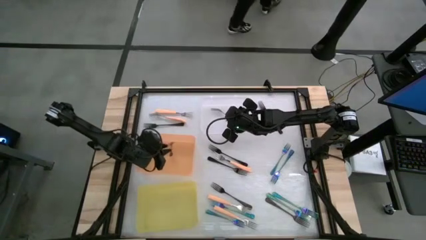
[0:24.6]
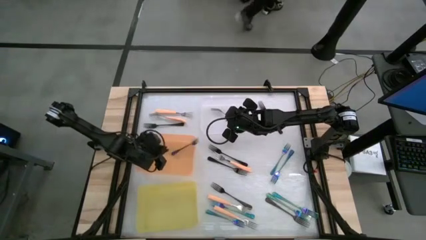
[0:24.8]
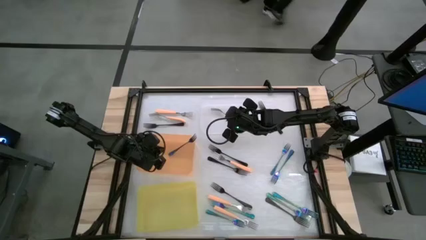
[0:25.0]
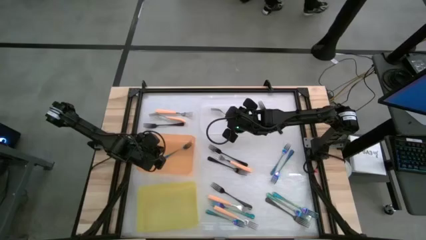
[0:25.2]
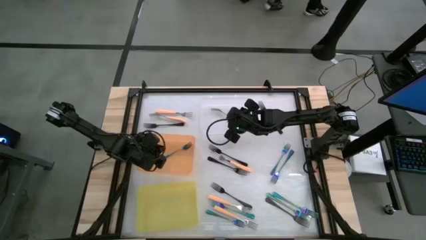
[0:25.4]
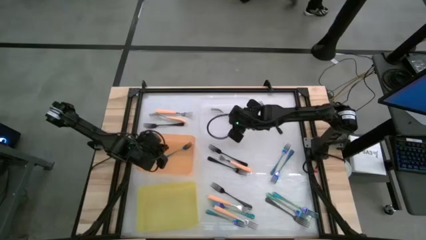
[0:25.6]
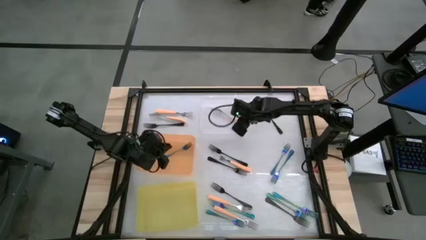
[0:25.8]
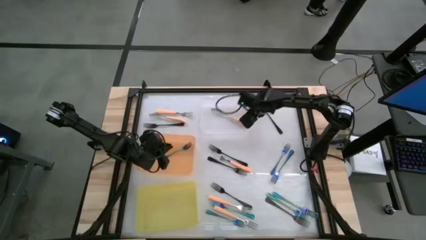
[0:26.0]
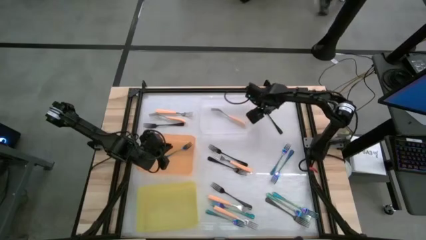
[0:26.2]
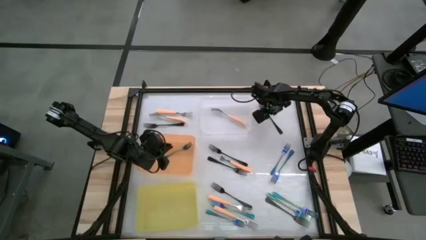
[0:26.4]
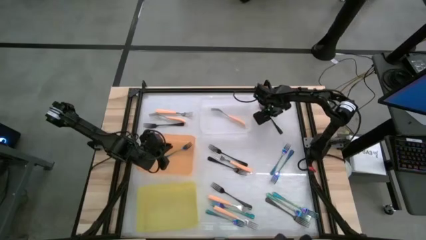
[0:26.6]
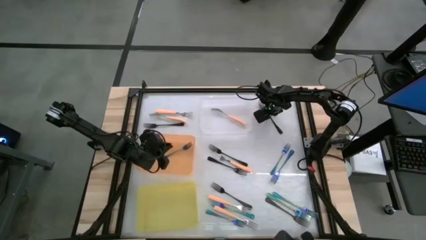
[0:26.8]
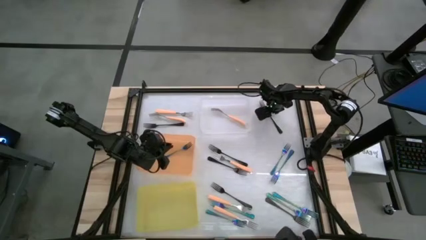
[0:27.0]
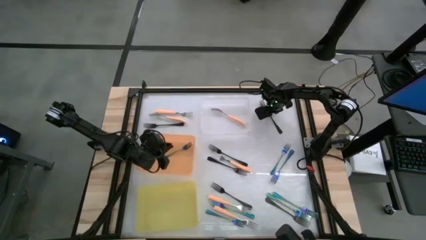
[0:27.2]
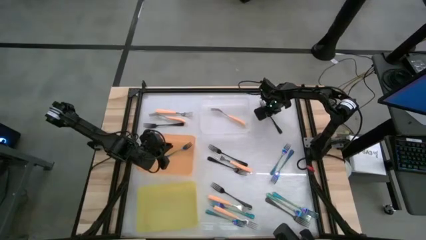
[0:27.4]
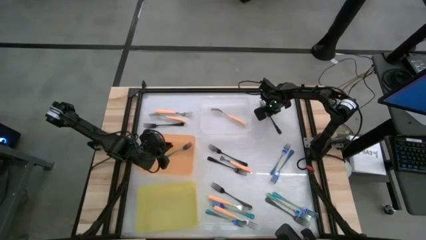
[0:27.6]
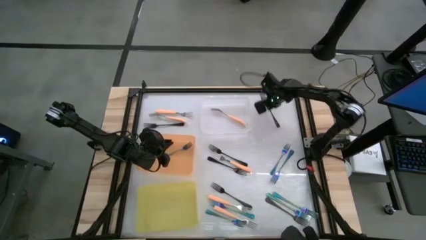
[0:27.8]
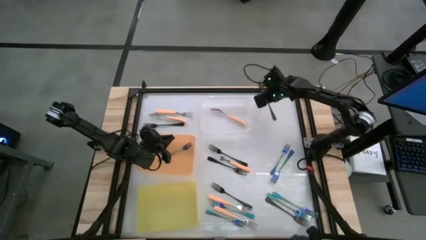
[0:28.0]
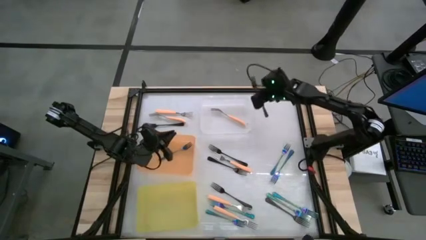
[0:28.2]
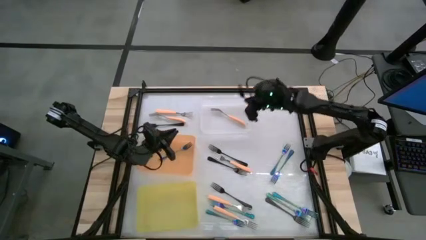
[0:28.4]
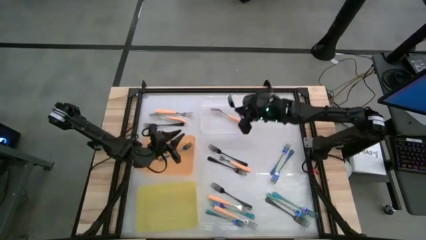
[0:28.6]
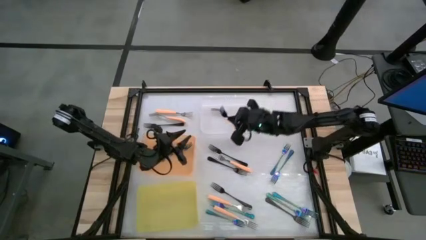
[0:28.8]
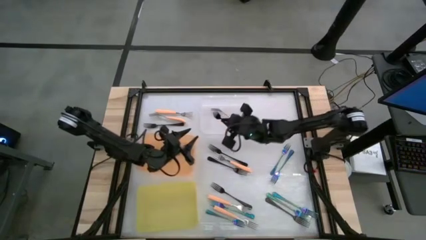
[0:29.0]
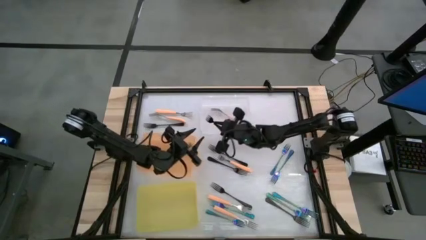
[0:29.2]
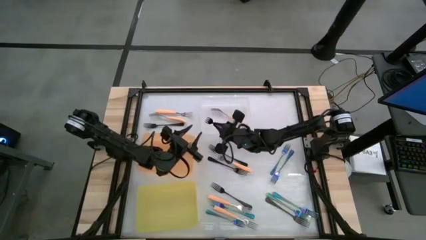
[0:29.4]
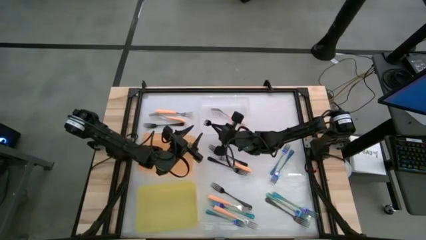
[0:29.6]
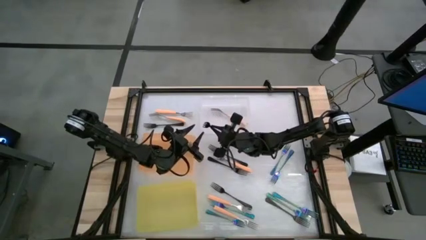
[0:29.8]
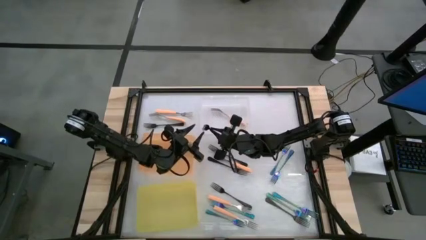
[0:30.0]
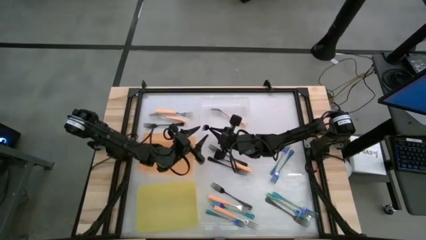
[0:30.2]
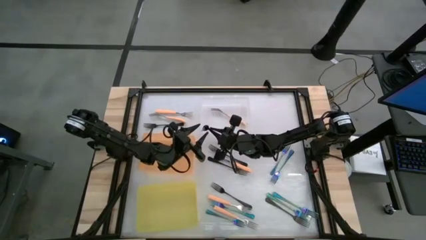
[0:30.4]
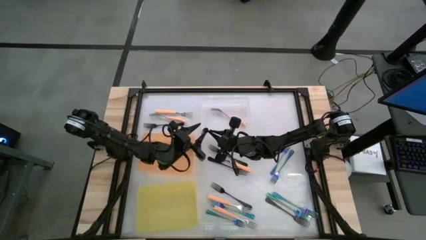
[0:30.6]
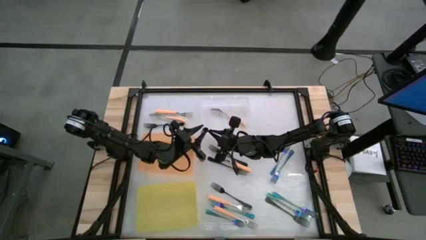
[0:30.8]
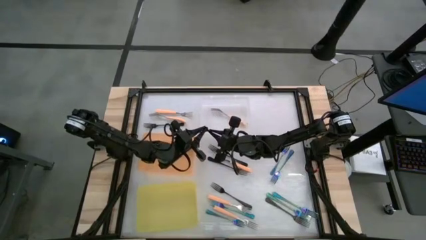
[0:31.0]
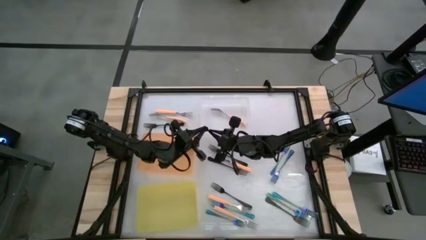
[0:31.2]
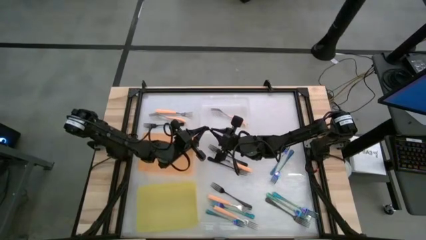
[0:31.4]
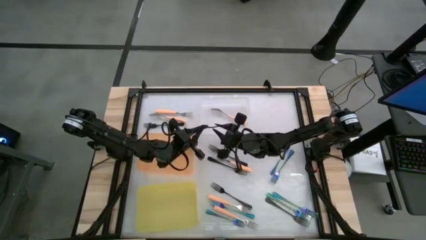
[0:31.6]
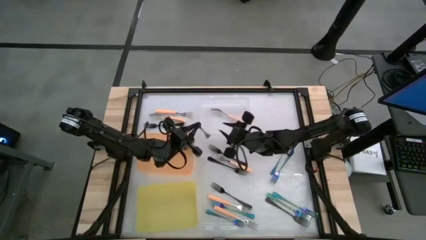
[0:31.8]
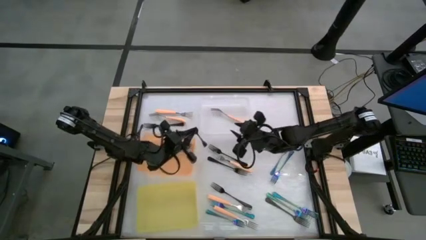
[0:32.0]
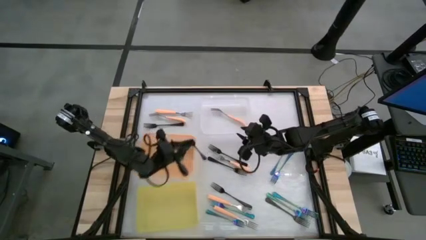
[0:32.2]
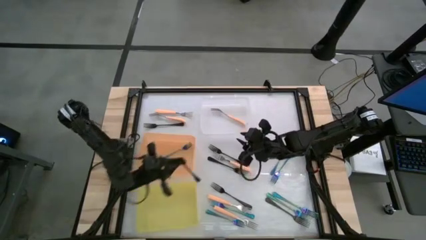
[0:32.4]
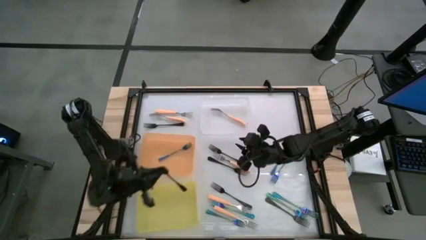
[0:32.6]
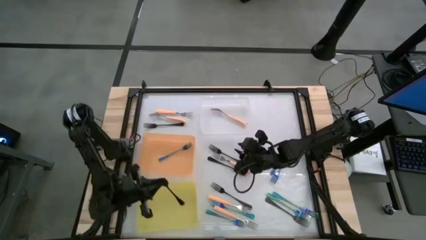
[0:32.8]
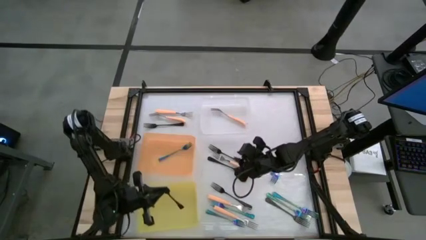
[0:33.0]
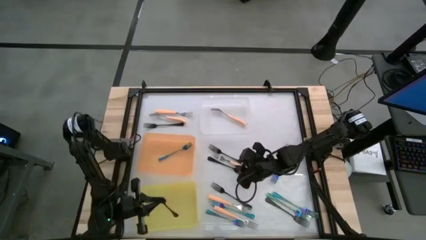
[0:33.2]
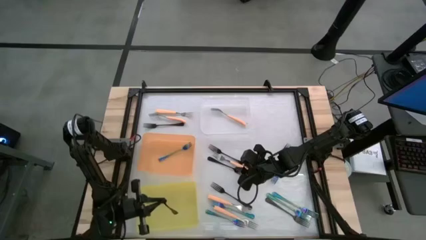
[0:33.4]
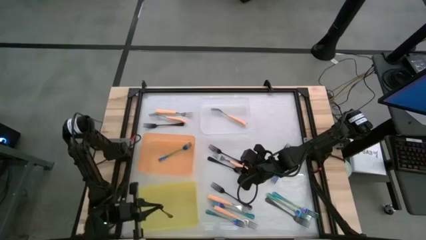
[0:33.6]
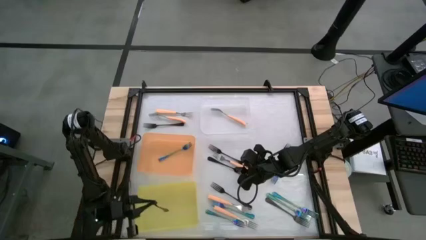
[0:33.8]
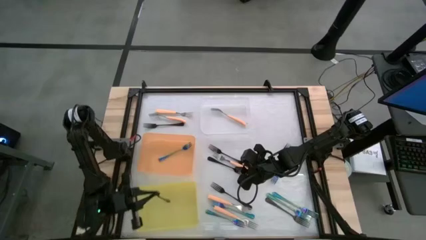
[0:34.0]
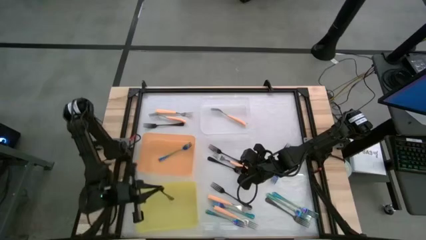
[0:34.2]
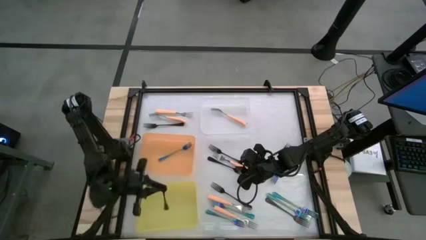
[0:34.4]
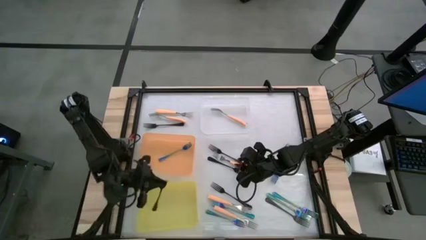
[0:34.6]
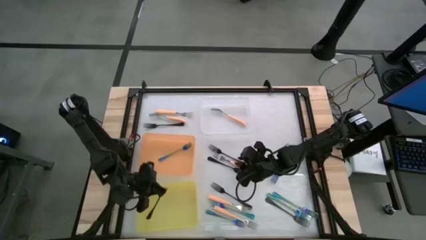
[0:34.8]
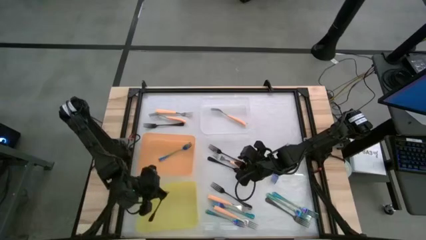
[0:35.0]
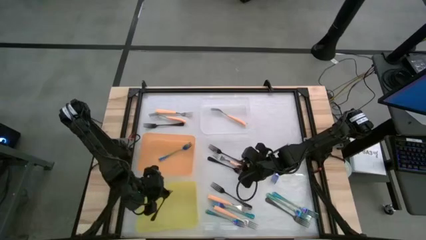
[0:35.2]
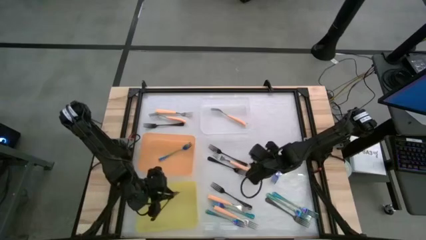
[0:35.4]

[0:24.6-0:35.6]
Task: Sort silverware by color (type)
Put the black fork into the yellow bin

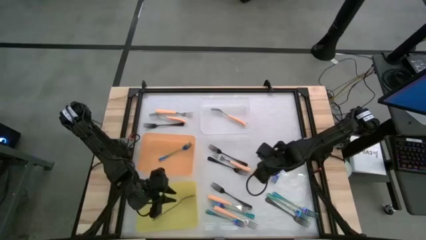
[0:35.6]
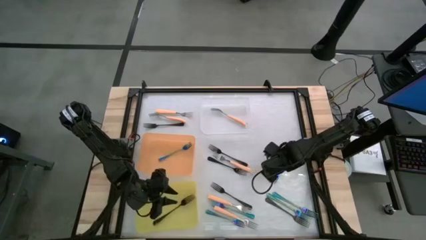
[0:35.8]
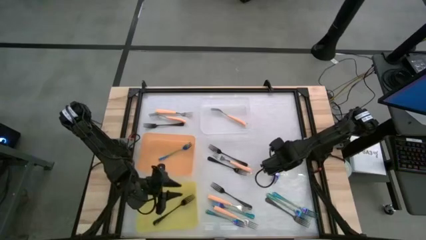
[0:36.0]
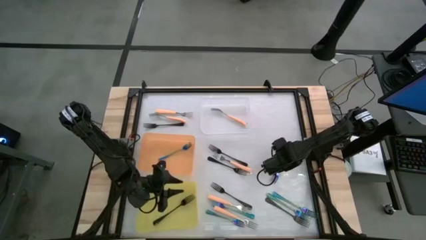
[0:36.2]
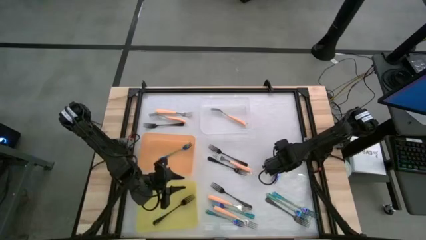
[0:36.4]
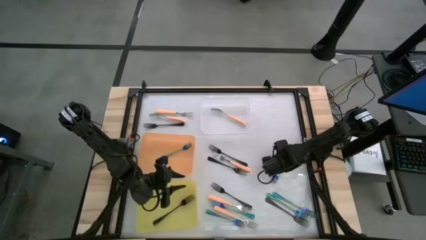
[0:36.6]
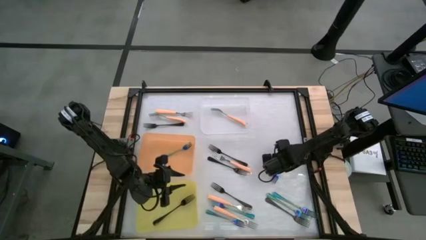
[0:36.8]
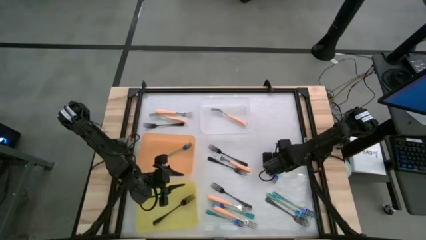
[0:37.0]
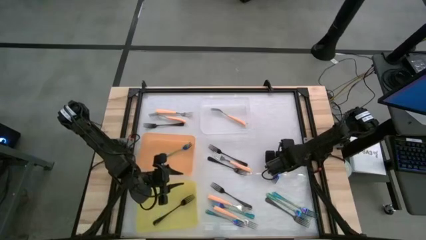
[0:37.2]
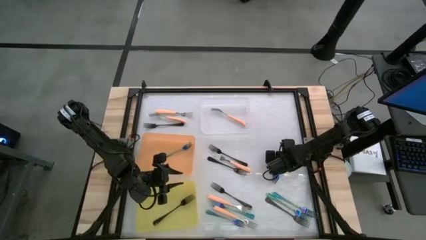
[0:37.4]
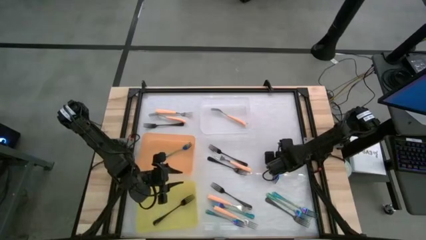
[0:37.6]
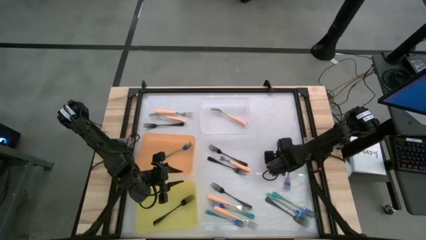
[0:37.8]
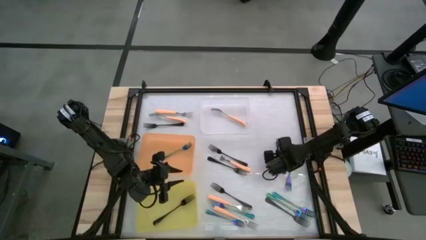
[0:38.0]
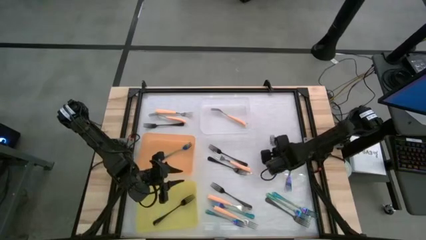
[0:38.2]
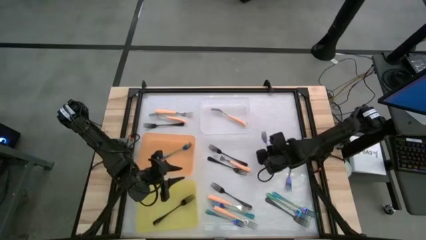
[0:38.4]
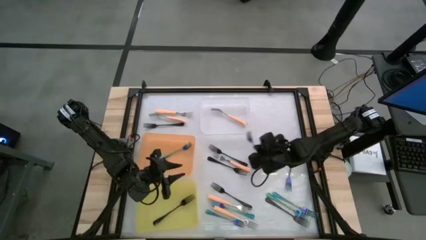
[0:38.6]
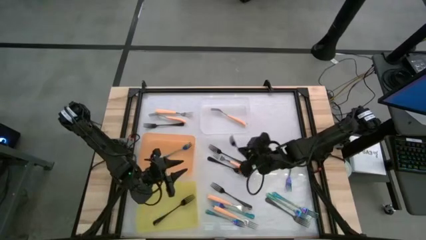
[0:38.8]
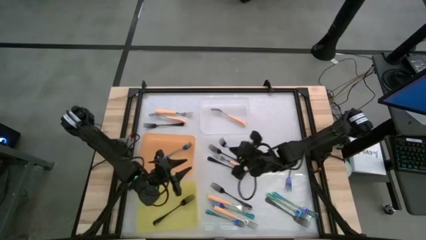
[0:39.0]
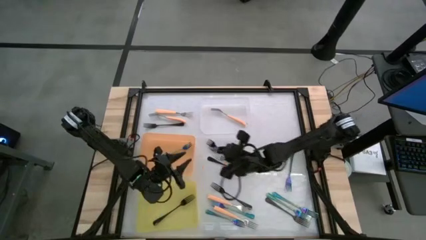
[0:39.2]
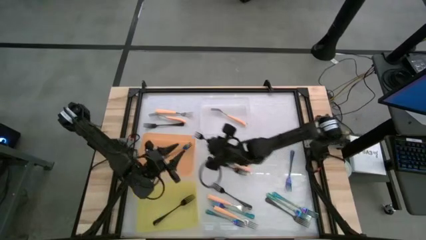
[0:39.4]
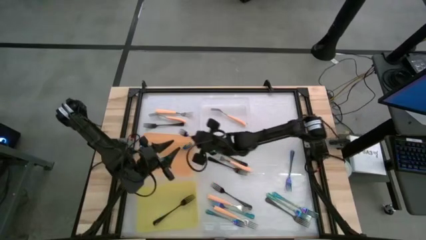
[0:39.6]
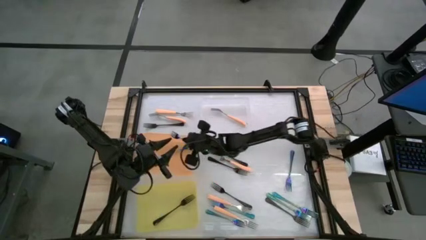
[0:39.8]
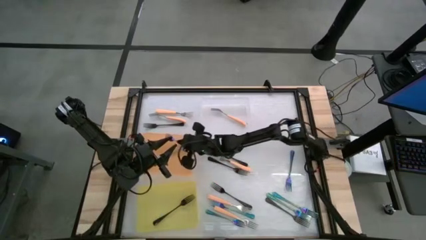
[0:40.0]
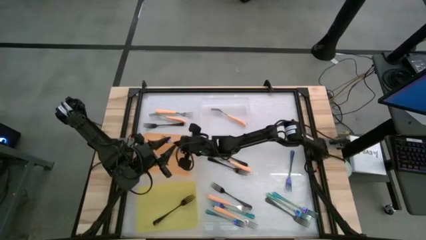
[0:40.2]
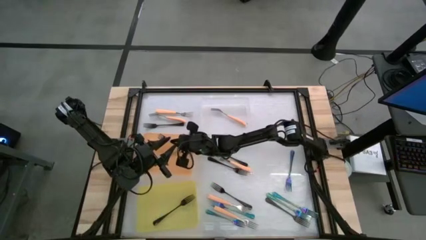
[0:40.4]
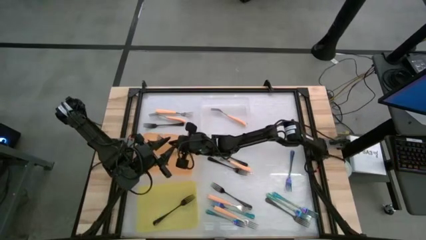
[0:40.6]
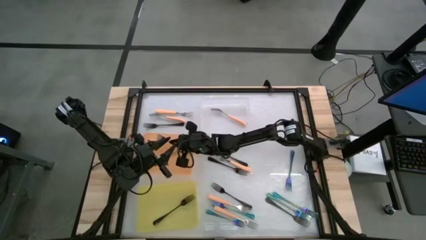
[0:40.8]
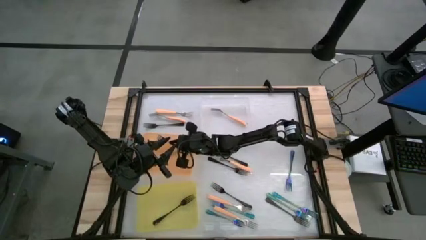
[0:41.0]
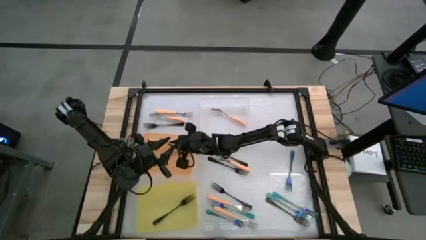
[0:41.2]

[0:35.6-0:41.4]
Put the blue fork into the orange bin
